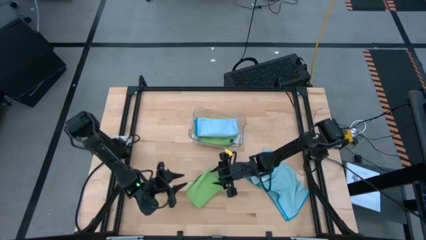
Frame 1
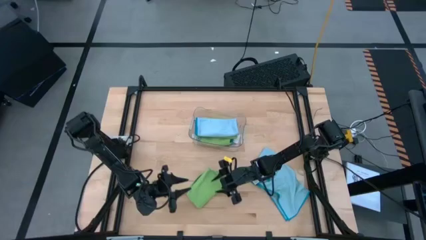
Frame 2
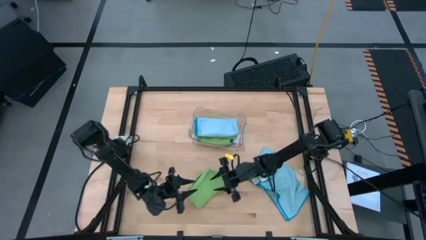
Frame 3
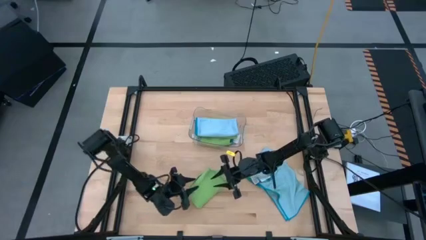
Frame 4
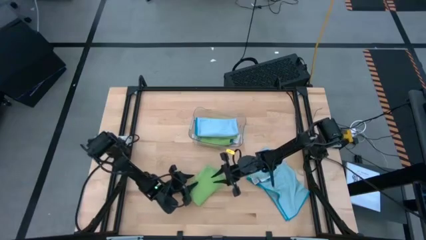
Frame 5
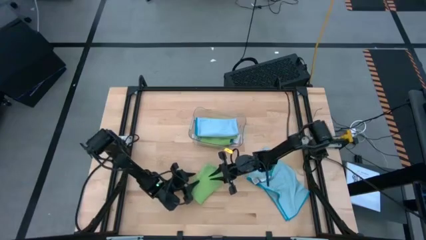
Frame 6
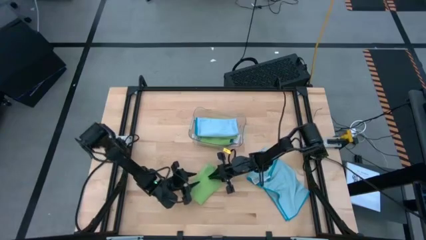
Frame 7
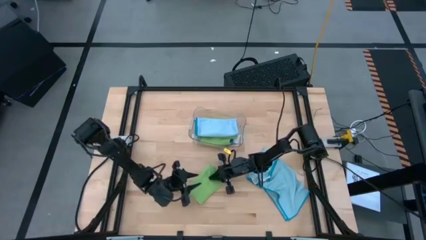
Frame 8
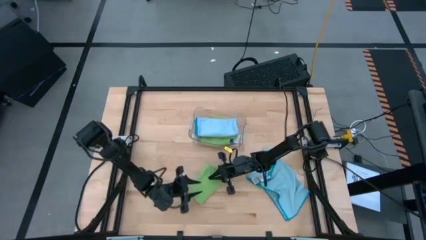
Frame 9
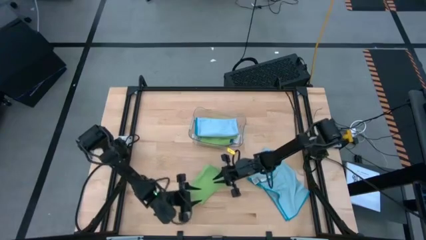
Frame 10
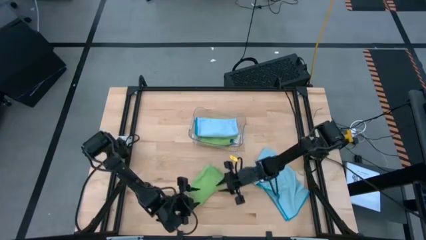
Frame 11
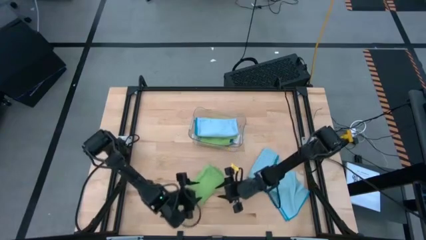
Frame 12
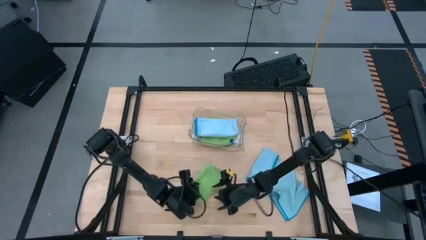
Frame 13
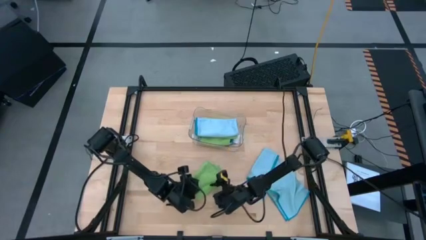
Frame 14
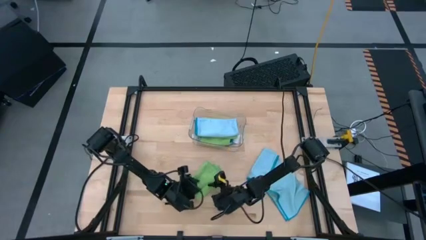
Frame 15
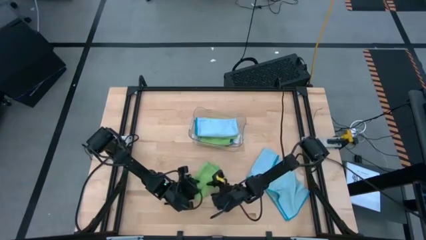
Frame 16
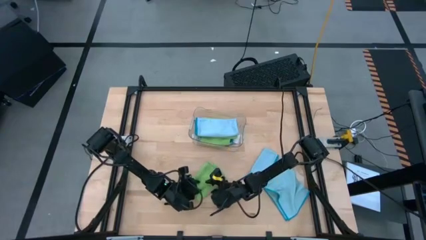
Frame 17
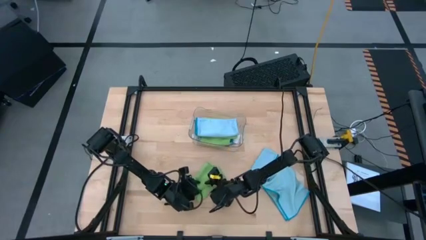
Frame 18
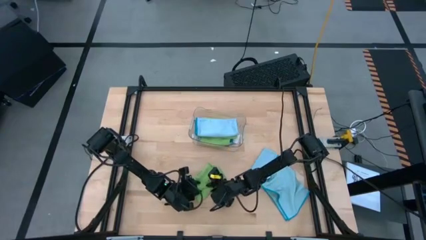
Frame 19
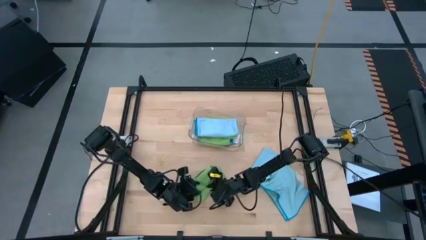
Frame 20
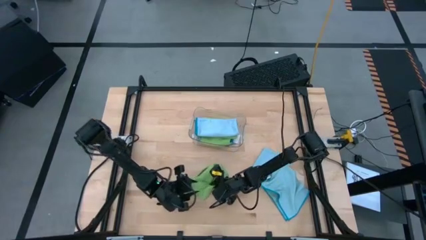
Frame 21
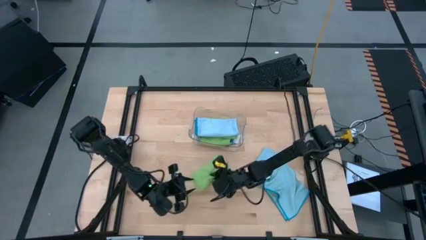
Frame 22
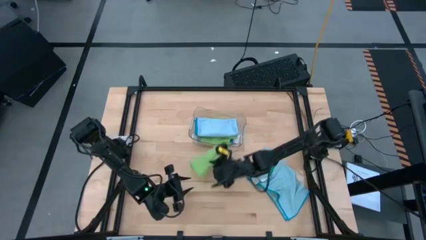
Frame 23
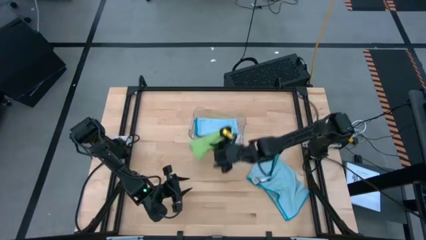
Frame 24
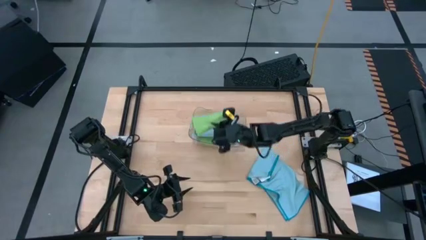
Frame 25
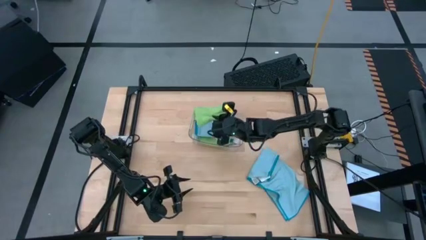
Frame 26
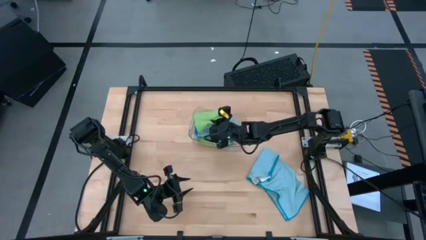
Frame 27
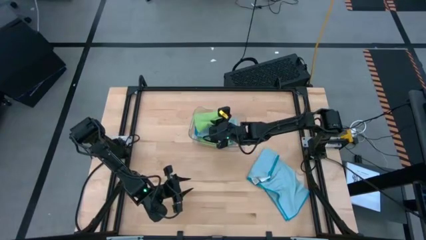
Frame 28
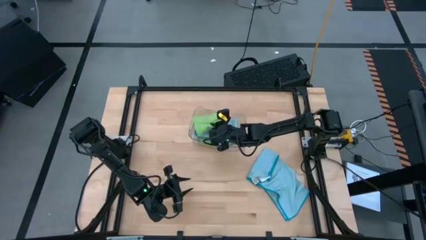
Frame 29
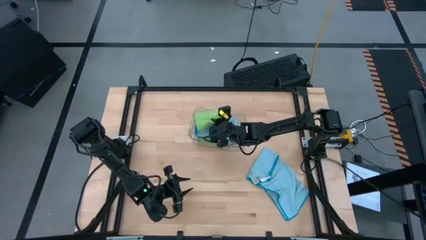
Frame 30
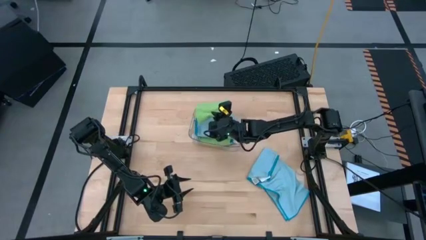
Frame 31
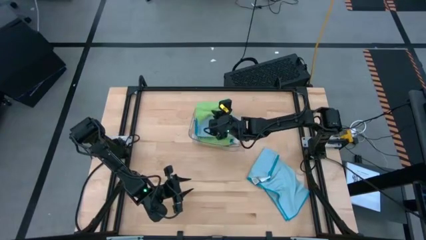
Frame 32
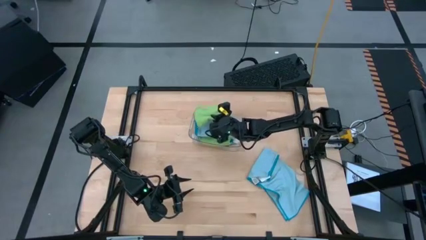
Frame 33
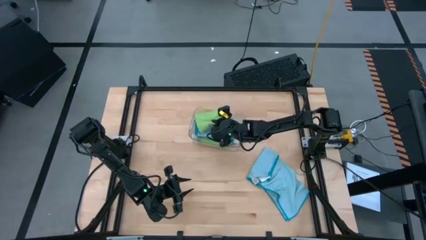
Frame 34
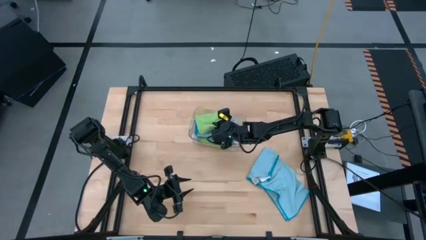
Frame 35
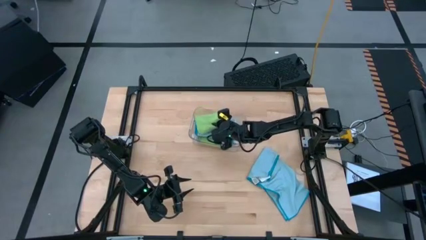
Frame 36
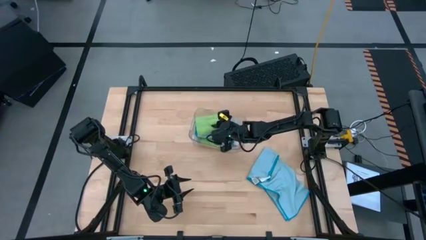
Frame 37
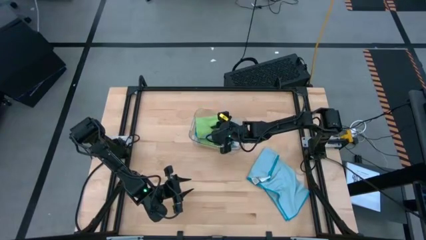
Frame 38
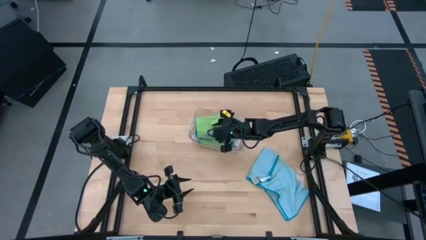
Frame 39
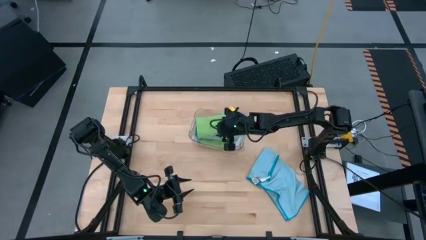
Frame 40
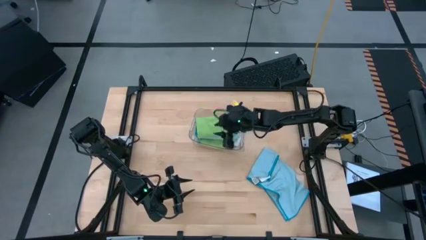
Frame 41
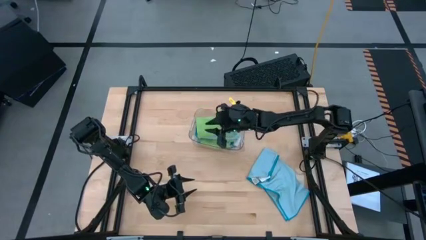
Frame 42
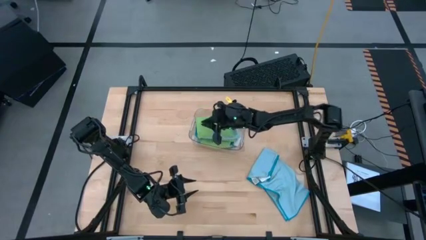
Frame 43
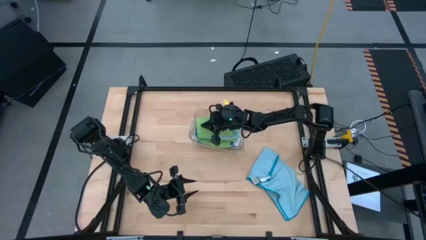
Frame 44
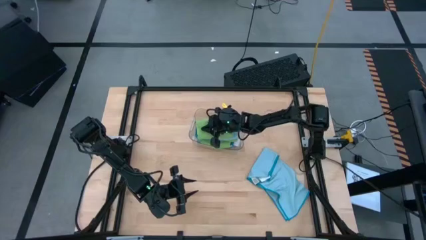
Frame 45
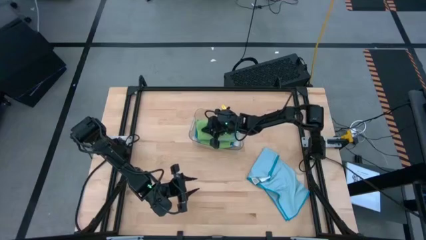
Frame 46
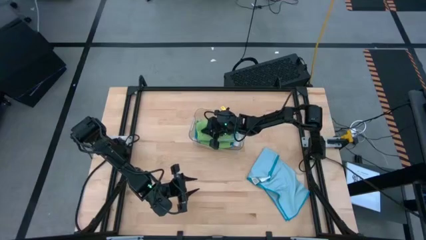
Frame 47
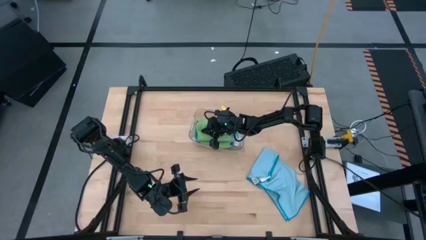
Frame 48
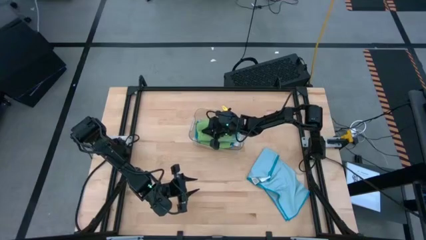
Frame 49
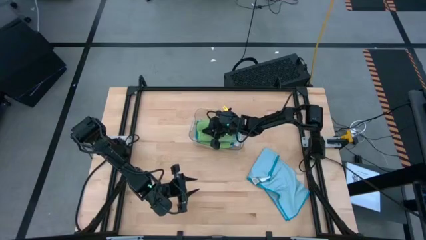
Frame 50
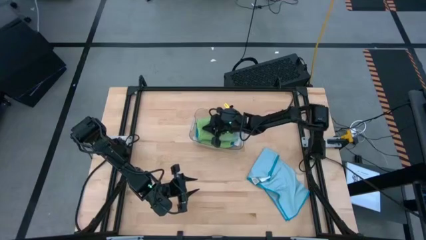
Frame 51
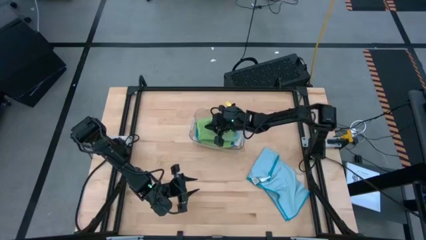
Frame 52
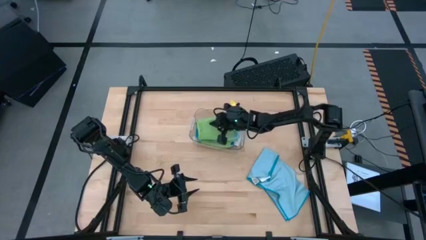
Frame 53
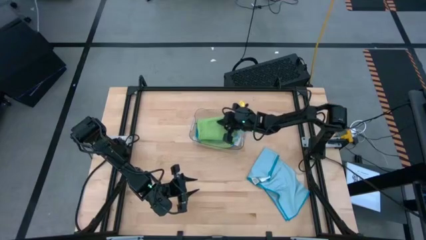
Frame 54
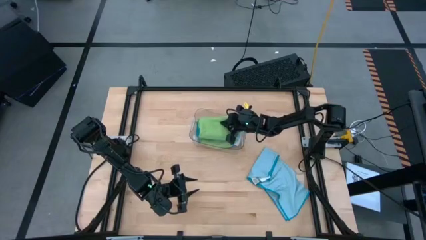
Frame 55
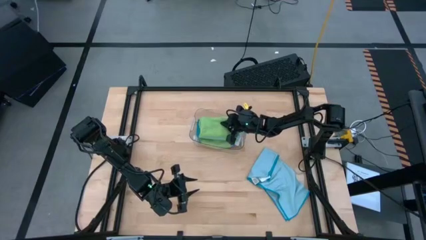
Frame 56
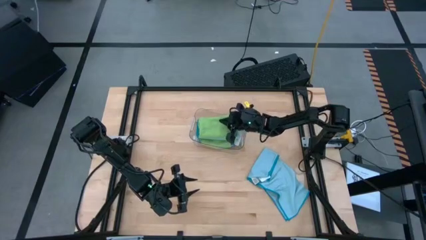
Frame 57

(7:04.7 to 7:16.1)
Task: Fold microfiber towels
Stack the green microfiber cloth on top of the blue microfiber cloth in the transparent bin
